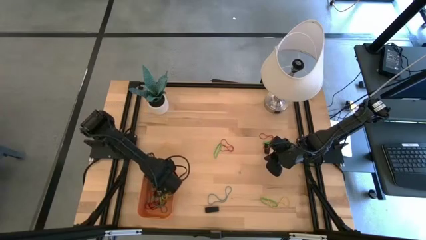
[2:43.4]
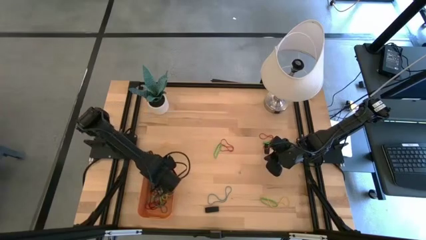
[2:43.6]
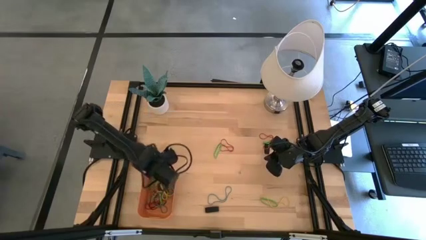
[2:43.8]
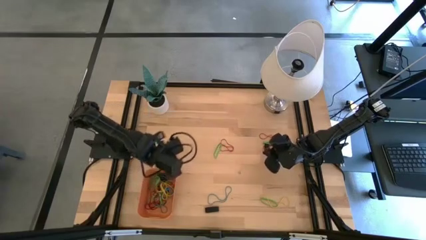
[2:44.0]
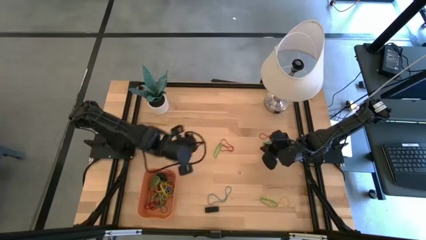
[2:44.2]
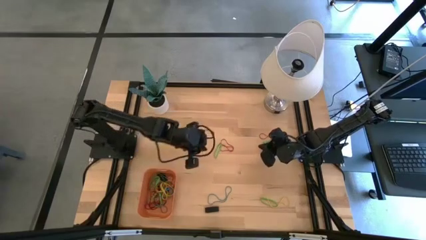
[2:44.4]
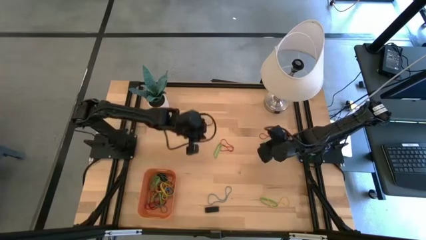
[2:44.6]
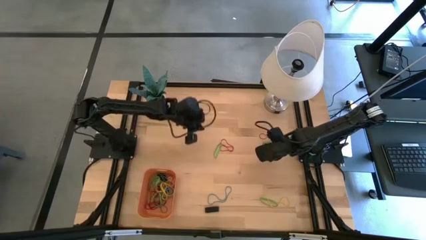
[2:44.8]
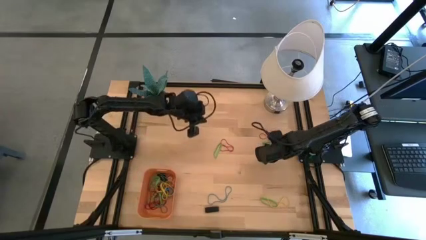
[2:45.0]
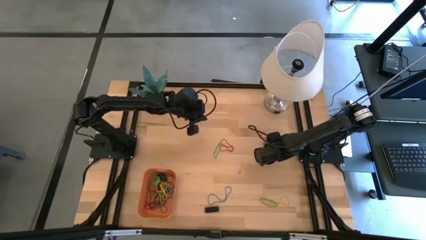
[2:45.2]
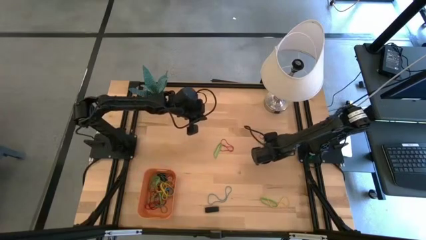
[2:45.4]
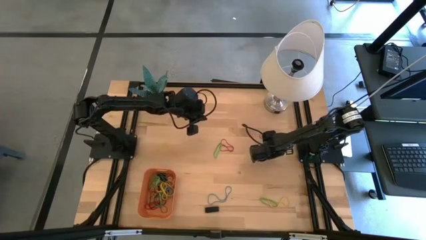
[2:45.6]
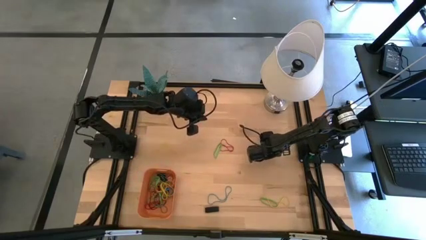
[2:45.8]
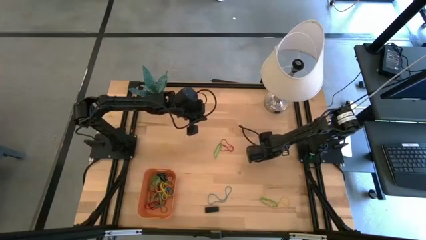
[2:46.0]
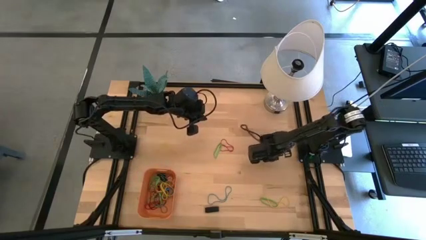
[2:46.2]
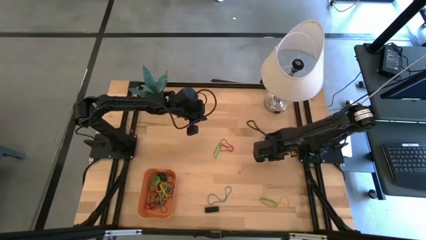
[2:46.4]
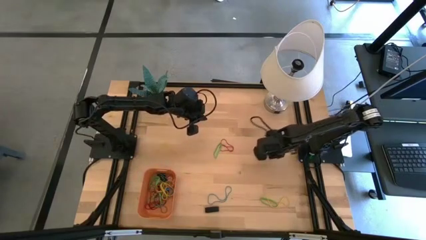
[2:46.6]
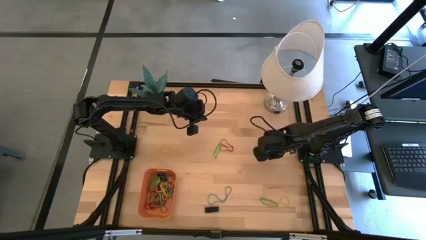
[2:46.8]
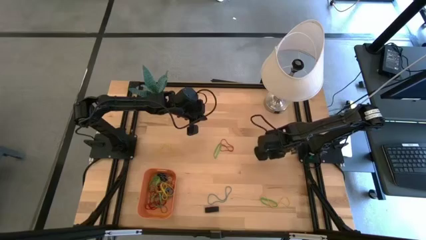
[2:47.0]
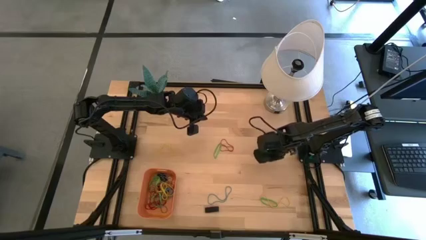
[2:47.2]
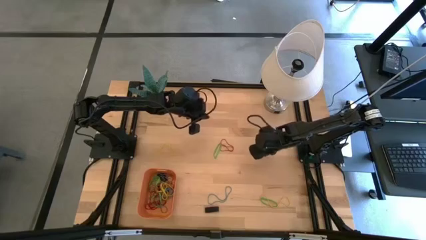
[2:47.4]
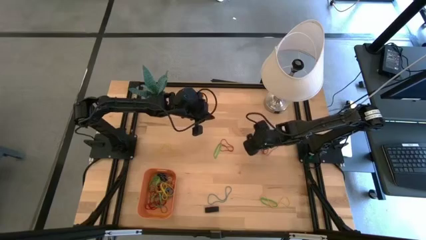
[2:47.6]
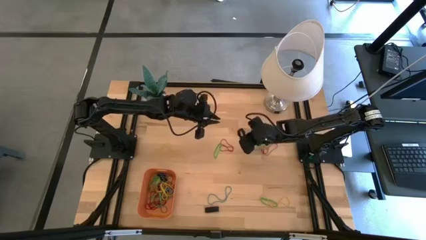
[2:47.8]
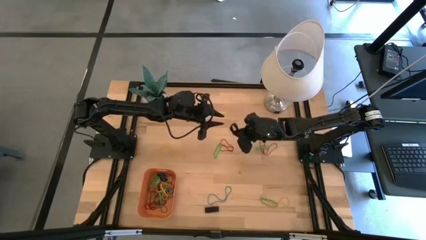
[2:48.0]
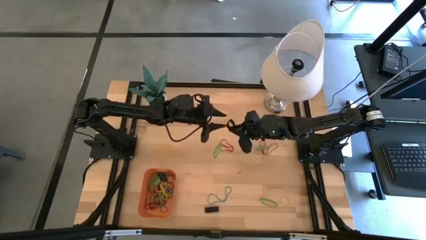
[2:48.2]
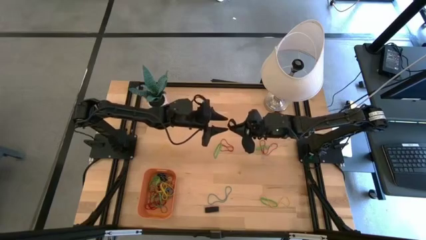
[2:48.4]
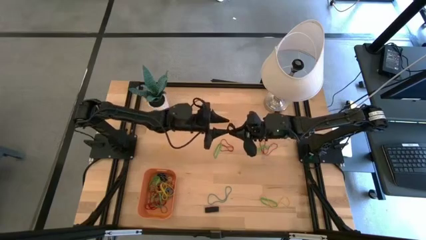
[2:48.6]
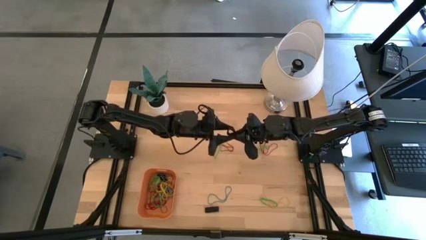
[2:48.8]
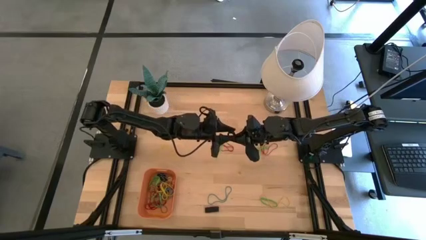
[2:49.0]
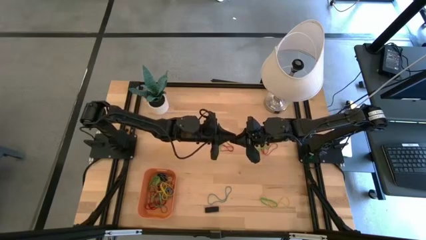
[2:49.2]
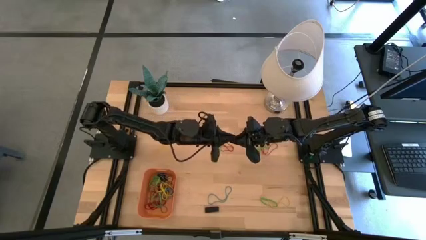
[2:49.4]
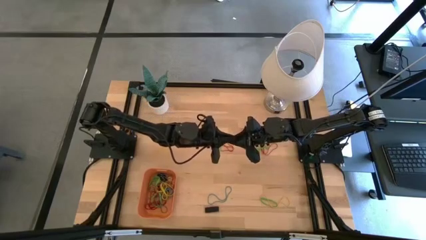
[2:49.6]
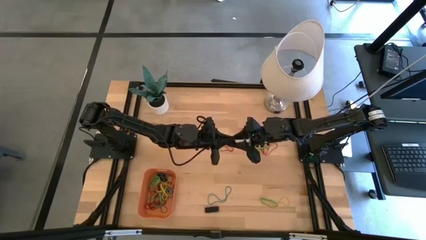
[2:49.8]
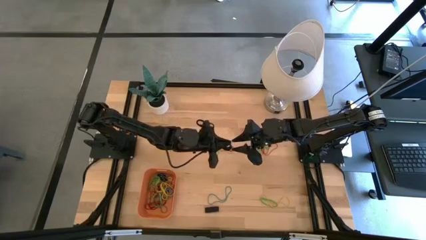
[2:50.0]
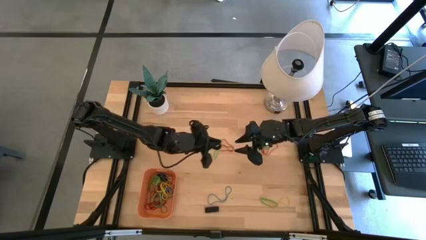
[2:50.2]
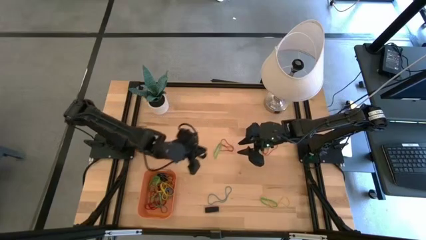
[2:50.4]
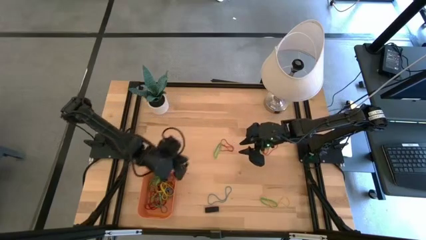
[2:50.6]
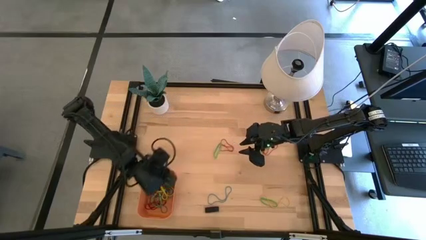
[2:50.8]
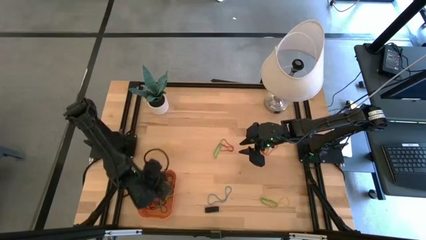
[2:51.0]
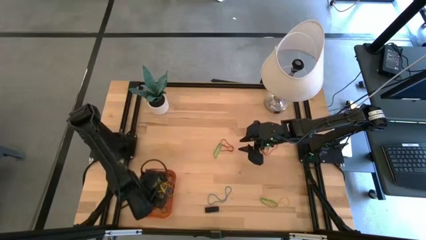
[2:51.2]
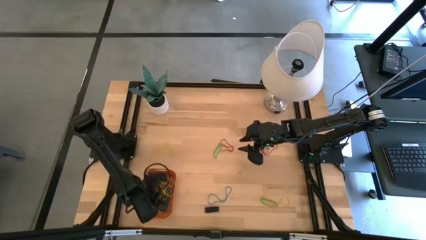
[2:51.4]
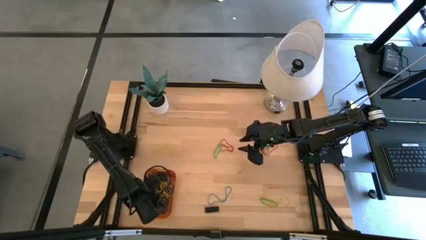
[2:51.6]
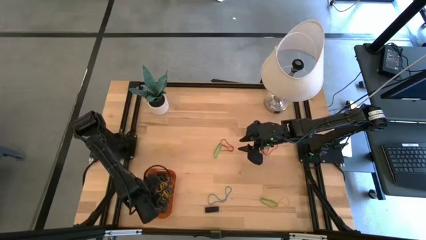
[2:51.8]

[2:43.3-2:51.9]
Task: Pick and place rubber bands into bin
Put the black rubber band into the orange bin

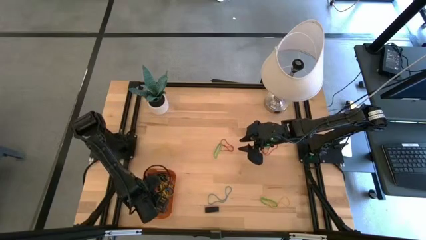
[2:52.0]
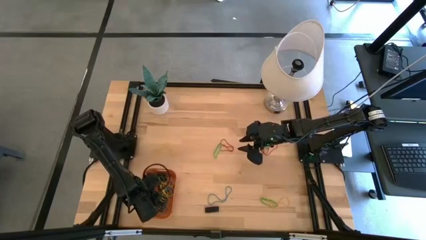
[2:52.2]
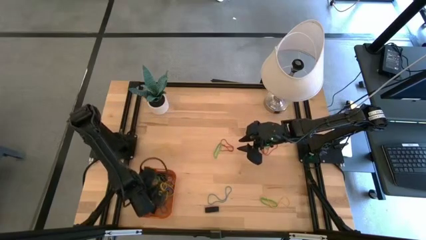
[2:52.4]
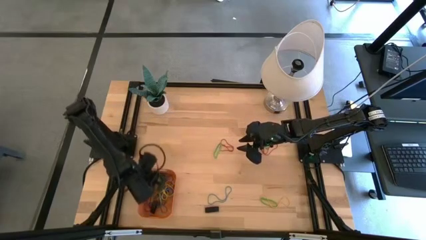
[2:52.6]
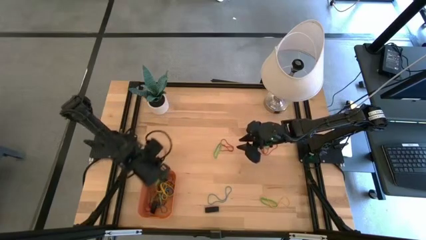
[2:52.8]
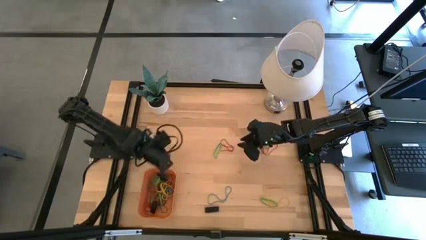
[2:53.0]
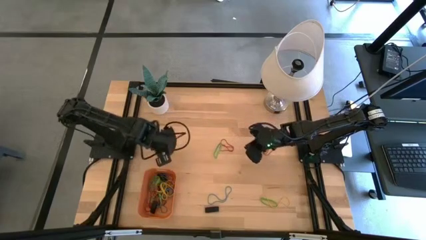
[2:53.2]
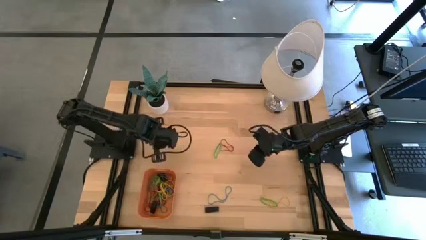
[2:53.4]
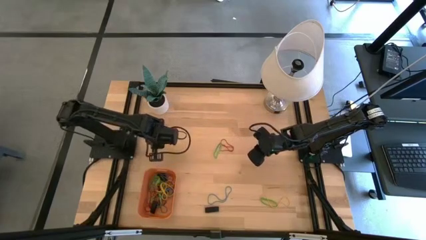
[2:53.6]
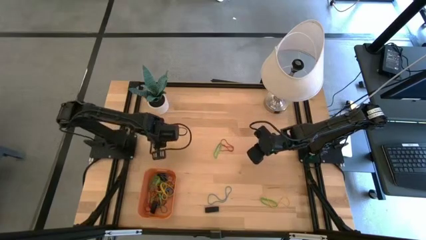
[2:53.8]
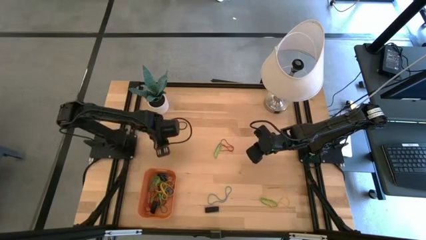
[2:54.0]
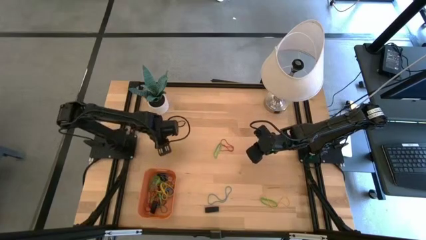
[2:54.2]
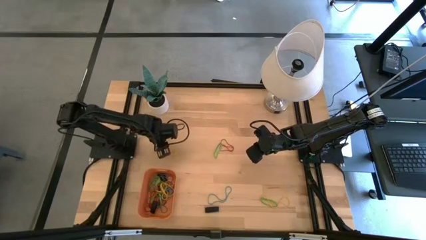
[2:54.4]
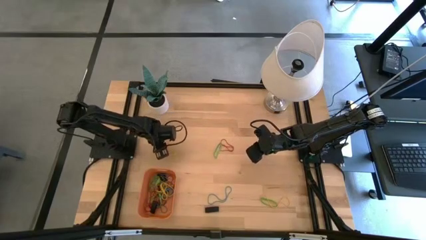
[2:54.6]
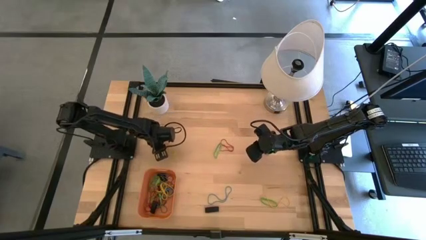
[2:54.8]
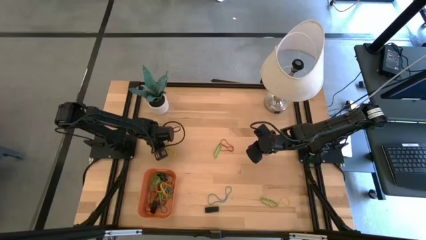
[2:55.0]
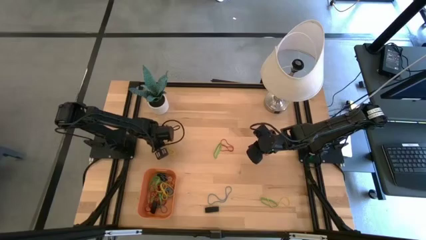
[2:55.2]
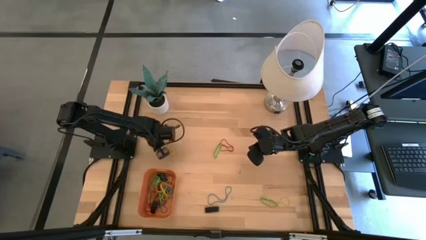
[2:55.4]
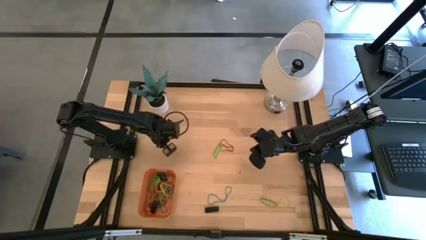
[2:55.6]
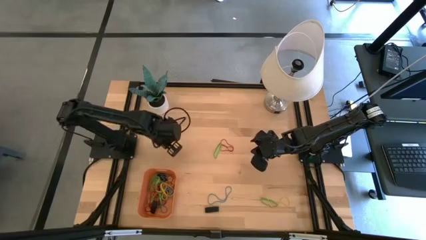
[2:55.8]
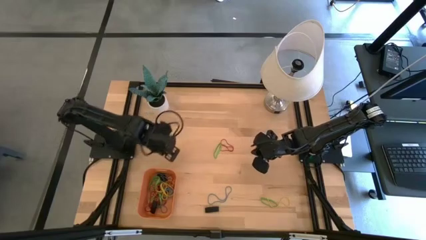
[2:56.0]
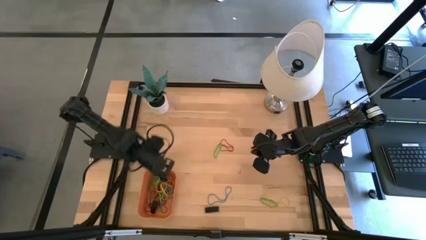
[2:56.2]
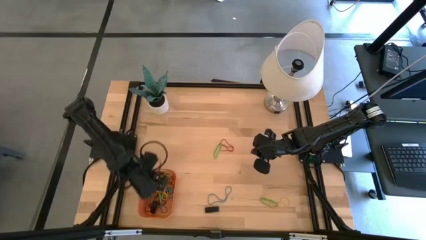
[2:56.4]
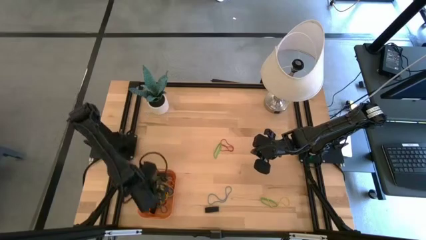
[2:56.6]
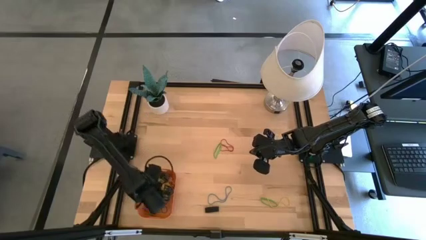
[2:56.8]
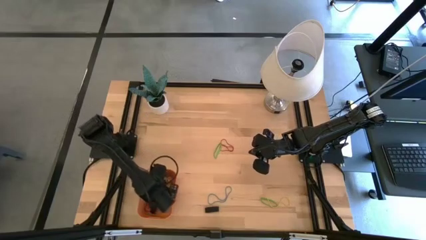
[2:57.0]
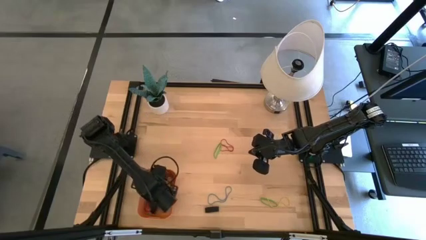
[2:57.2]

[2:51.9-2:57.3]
Put the yellow rubber band into the orange bin
